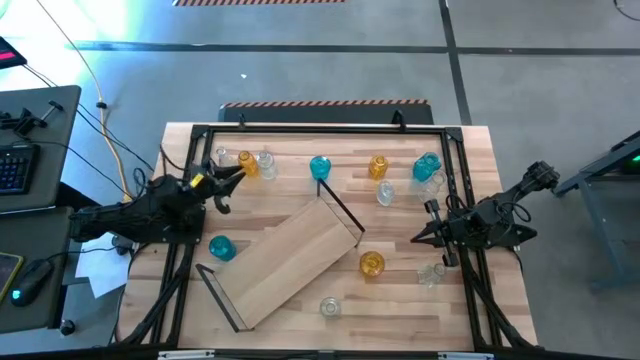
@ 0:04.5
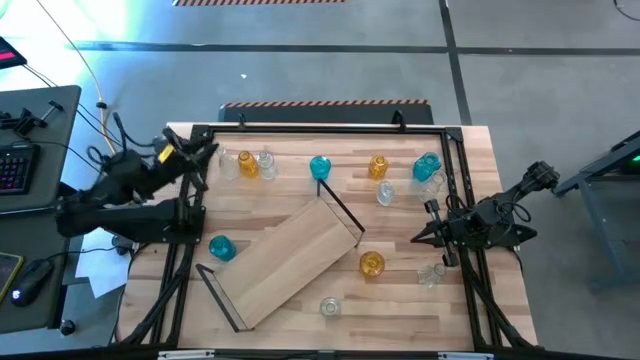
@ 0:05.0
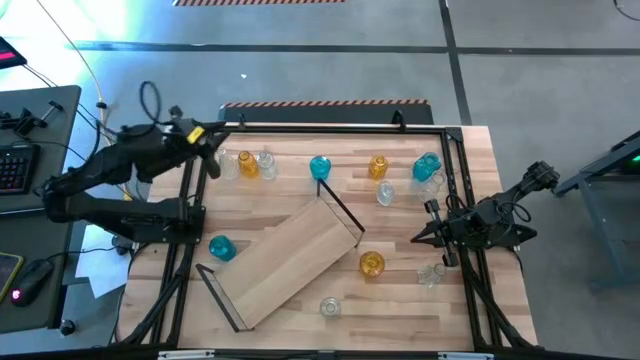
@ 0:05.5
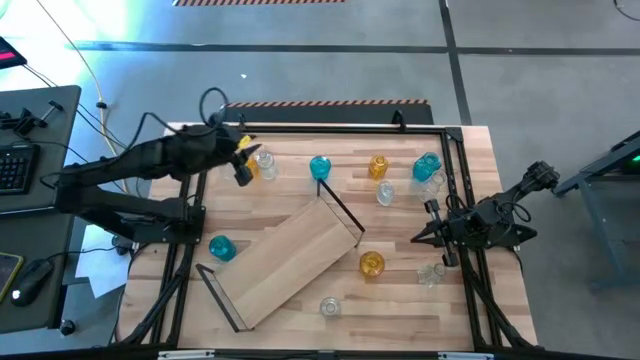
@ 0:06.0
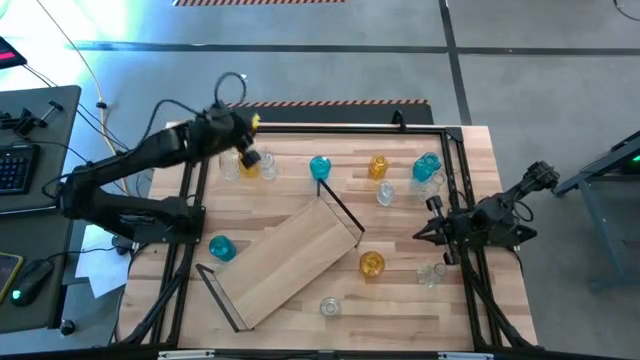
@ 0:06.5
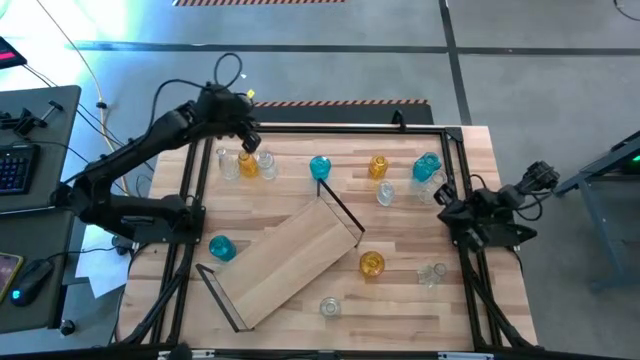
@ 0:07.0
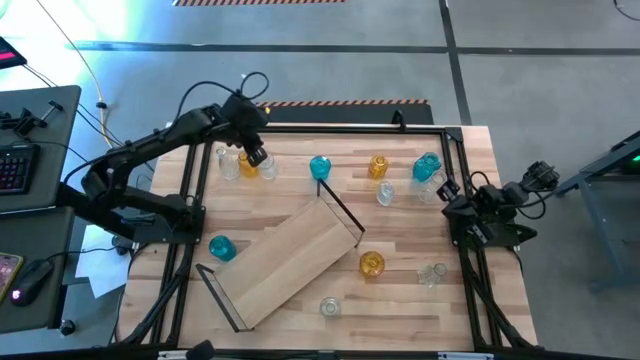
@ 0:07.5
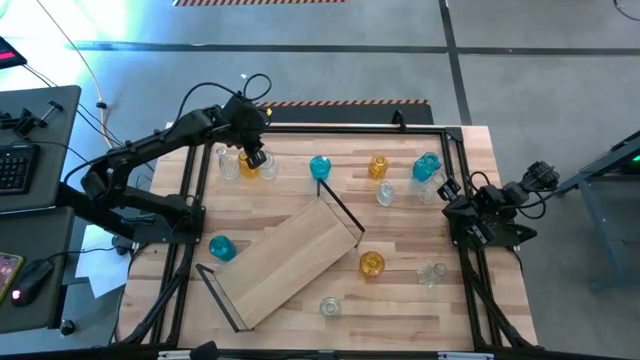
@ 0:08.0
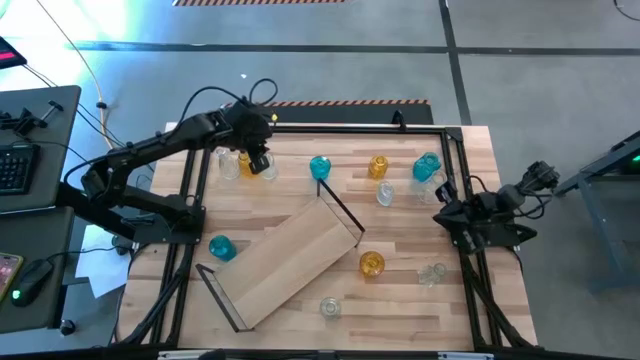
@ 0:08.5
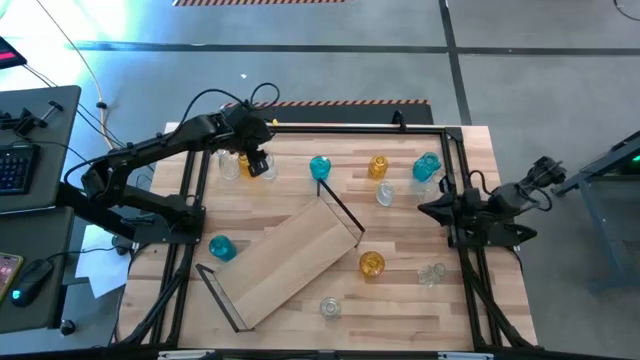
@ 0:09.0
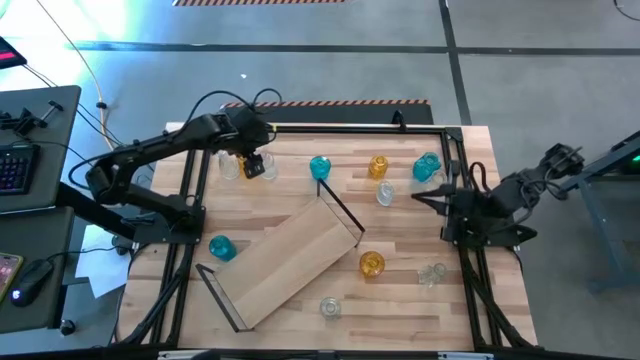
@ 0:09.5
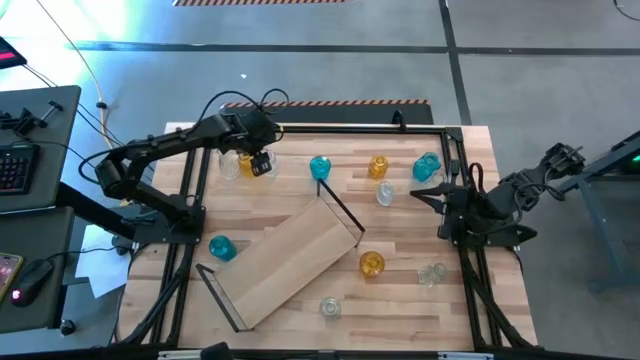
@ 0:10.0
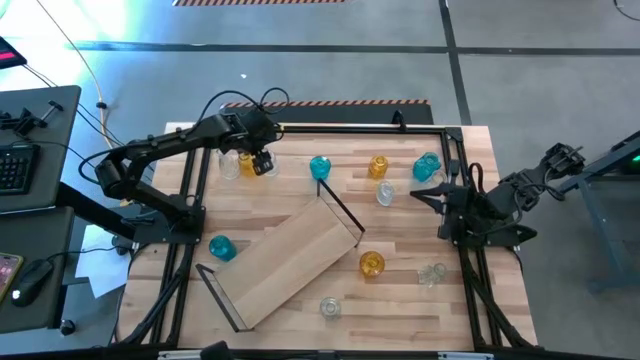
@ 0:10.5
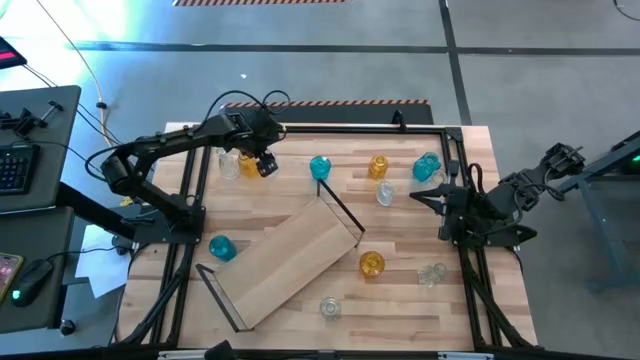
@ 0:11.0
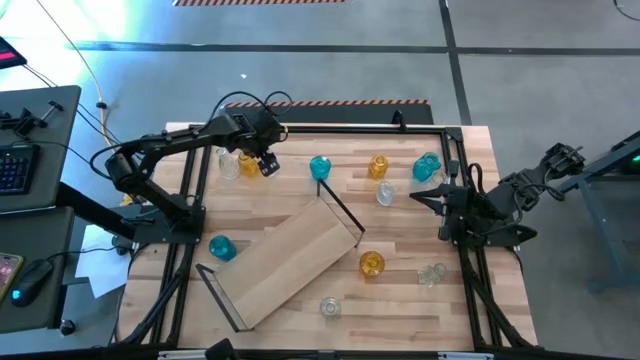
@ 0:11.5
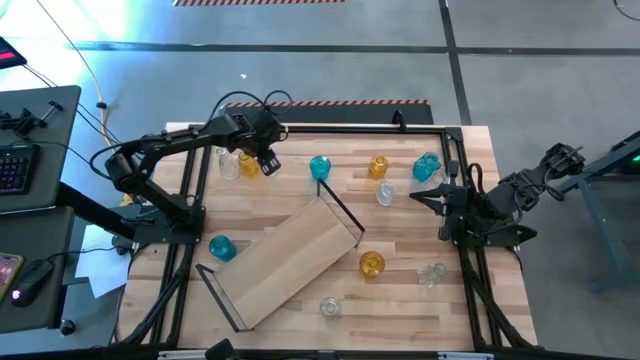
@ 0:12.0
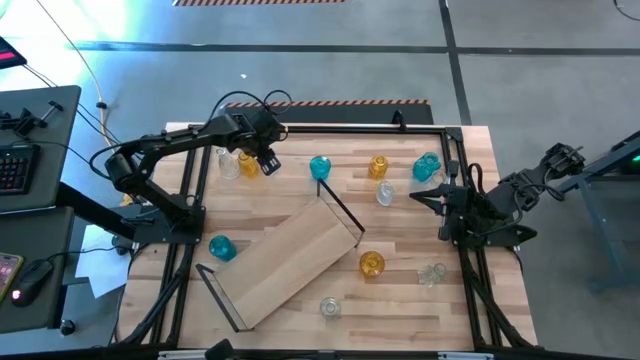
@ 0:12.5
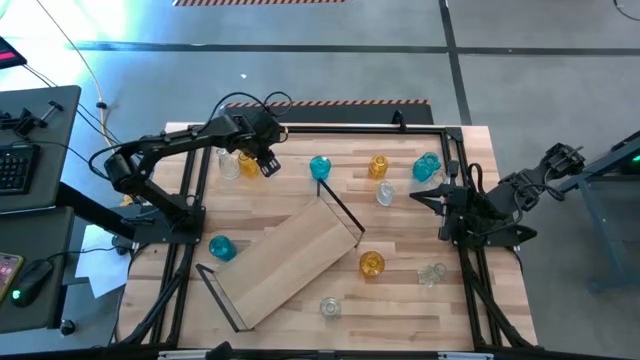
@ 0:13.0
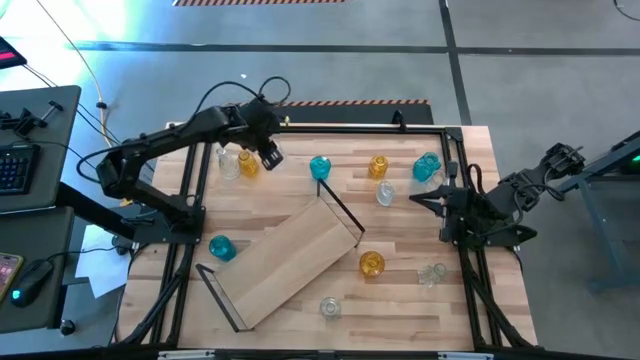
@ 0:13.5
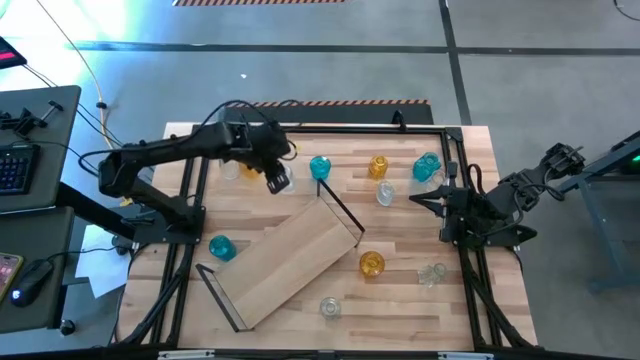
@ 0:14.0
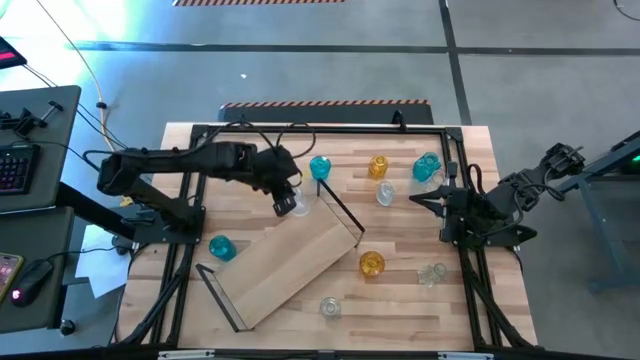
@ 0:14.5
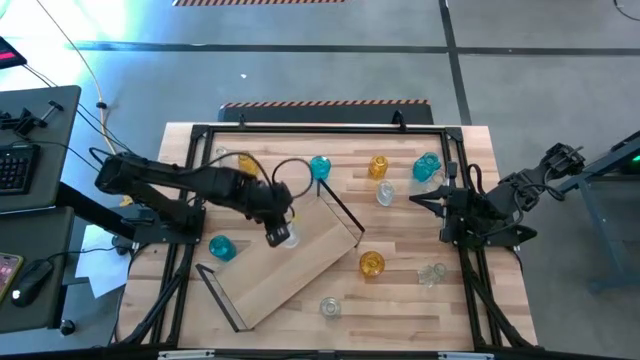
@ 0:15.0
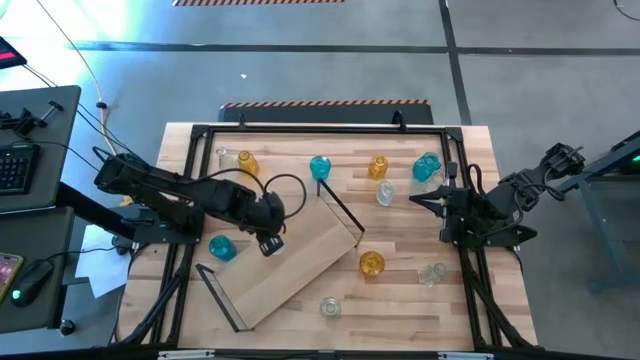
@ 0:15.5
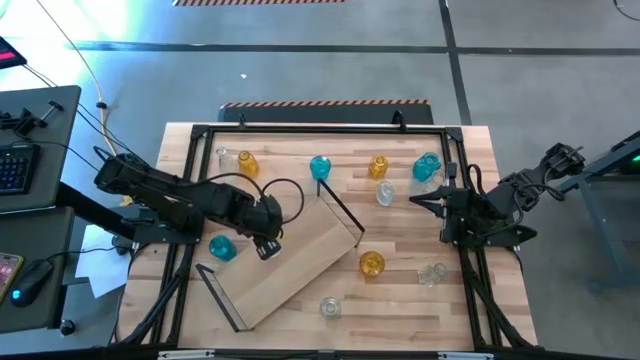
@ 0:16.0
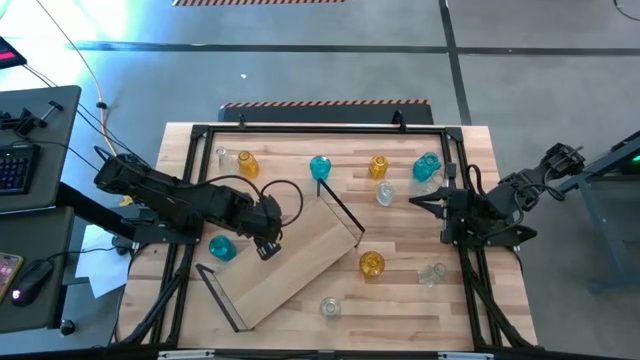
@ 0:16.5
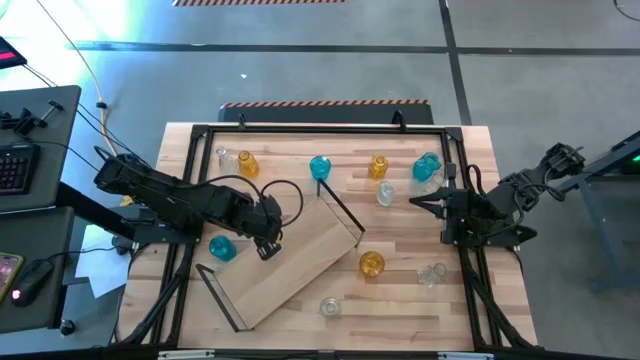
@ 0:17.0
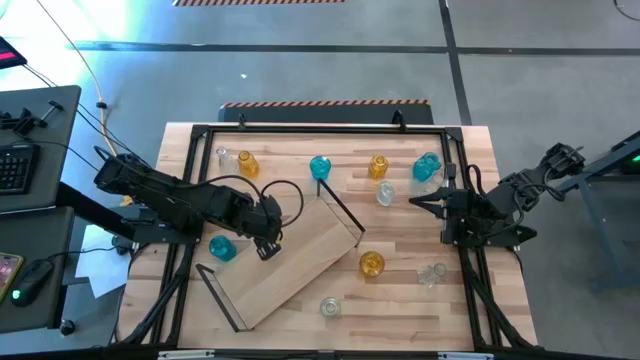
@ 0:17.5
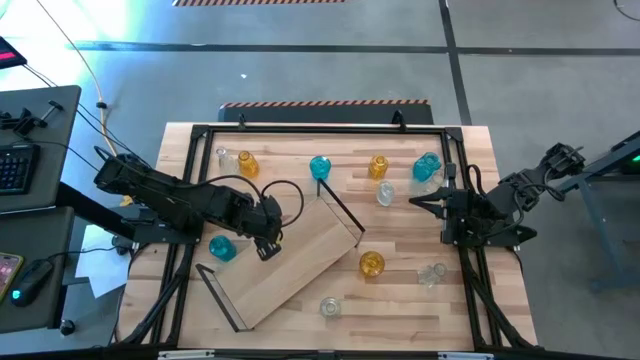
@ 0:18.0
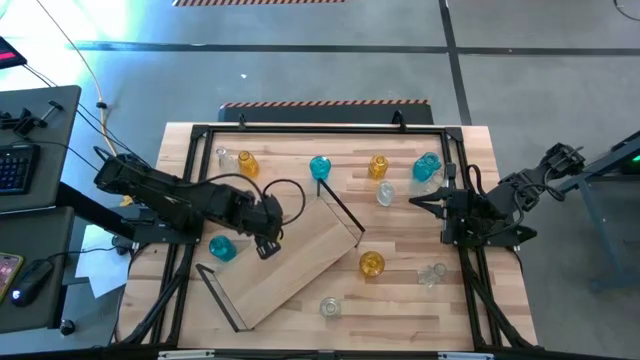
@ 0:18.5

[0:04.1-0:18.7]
Task: sort vases onto shelf
Put the transparent vase on the shelf

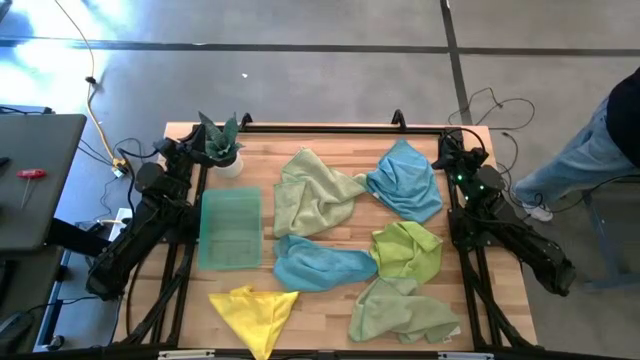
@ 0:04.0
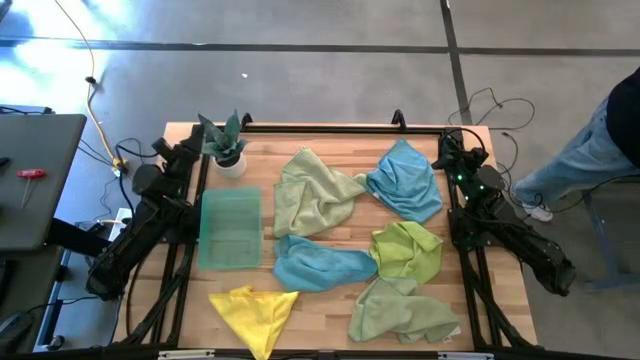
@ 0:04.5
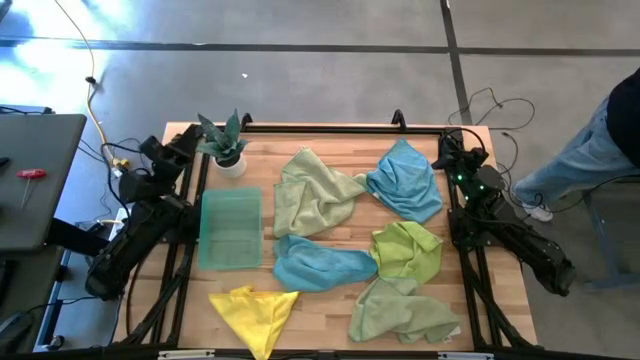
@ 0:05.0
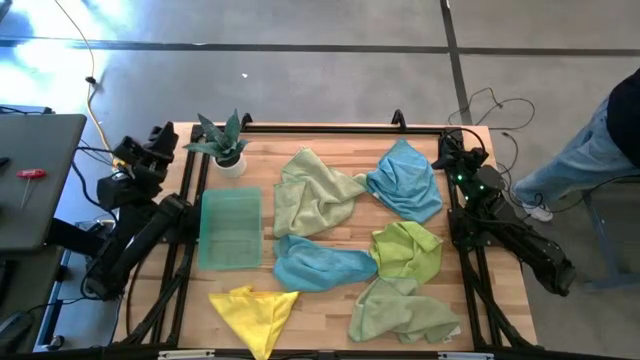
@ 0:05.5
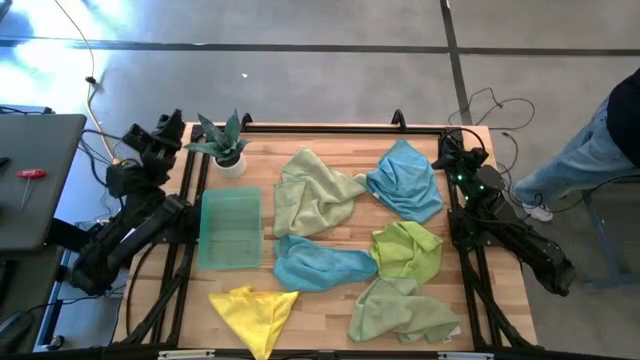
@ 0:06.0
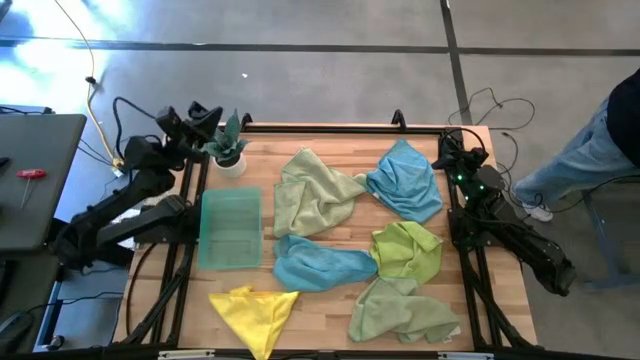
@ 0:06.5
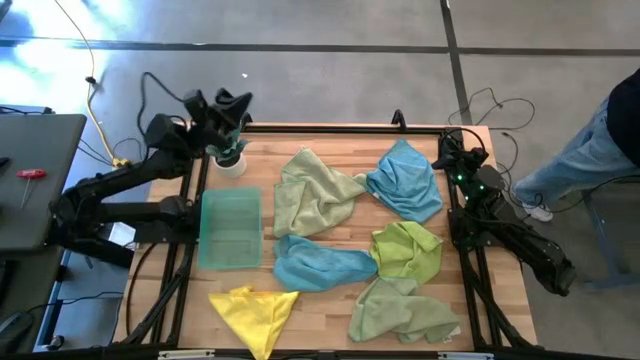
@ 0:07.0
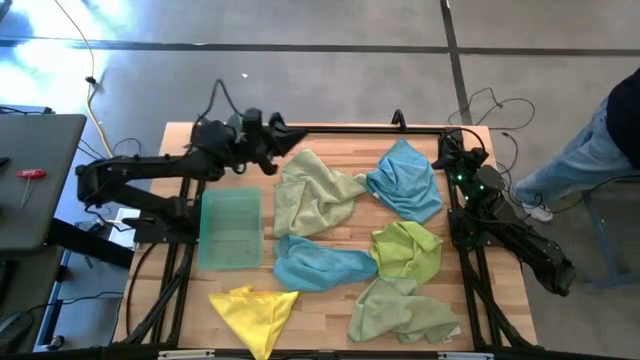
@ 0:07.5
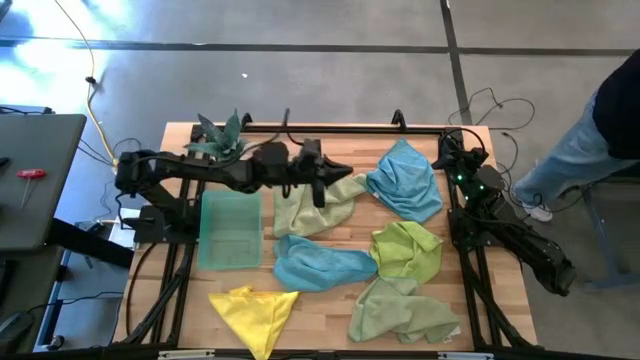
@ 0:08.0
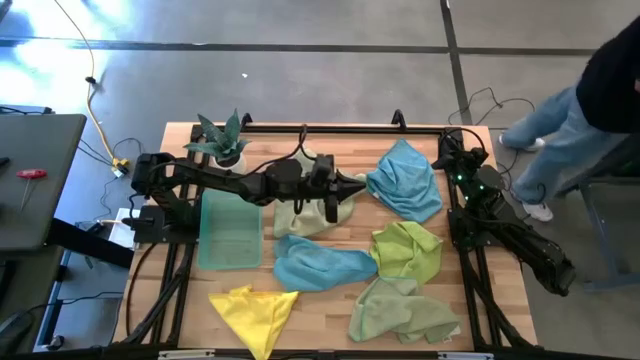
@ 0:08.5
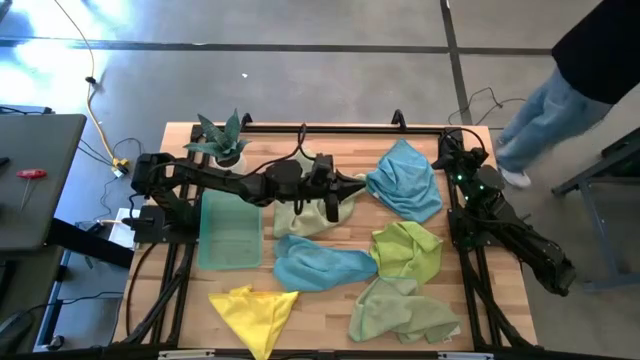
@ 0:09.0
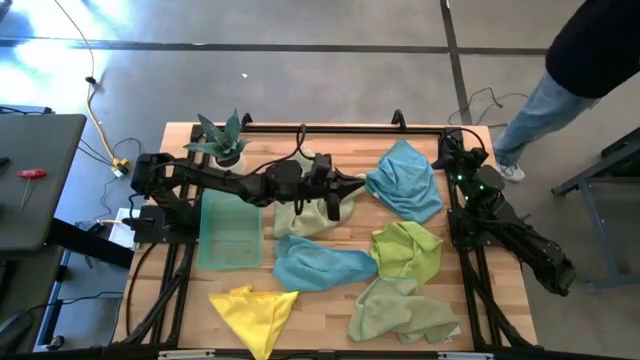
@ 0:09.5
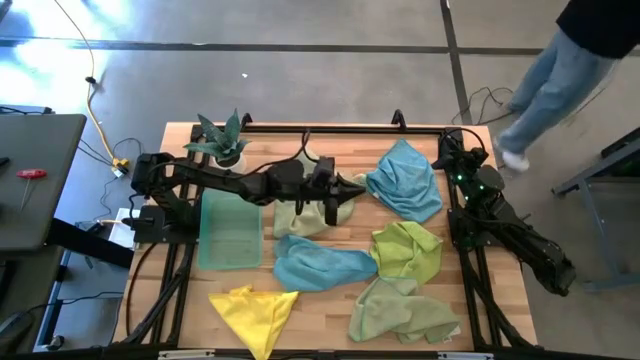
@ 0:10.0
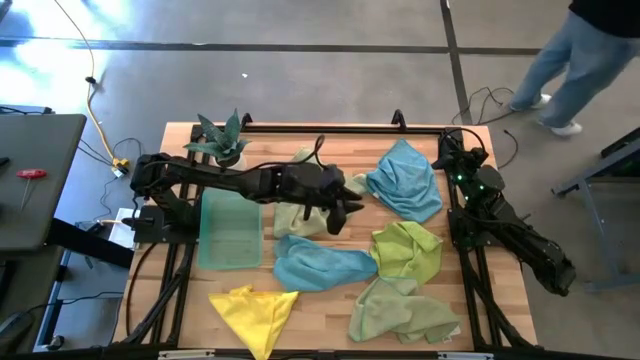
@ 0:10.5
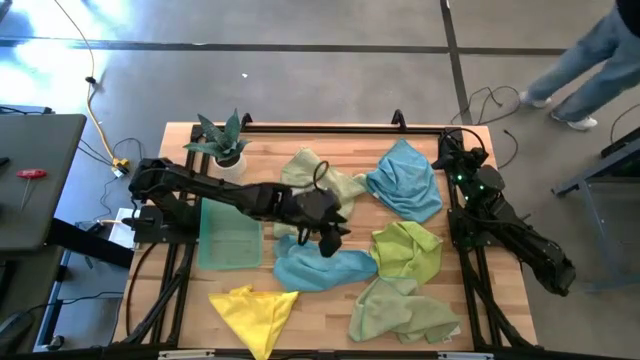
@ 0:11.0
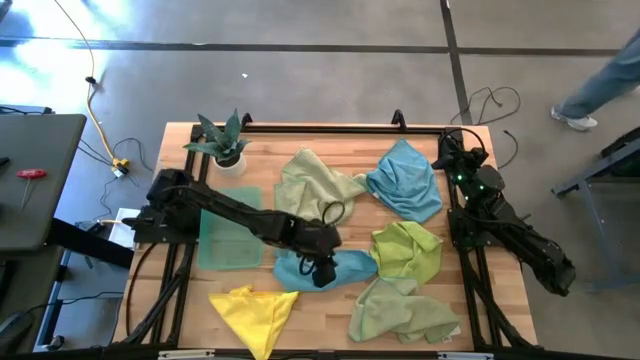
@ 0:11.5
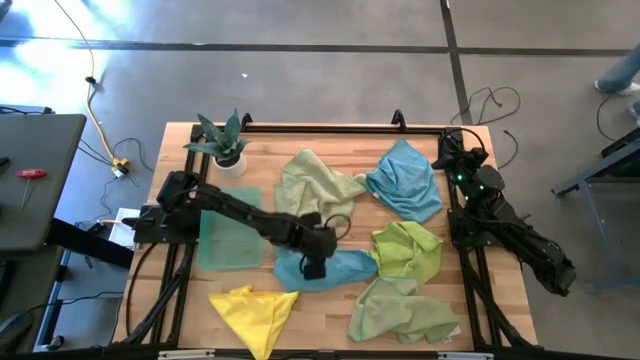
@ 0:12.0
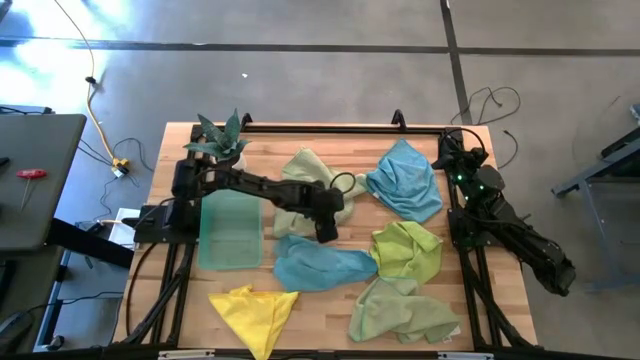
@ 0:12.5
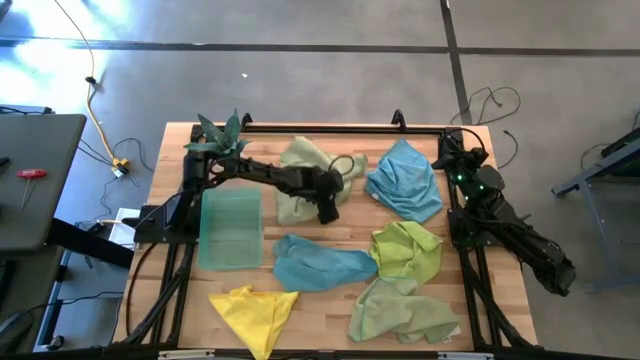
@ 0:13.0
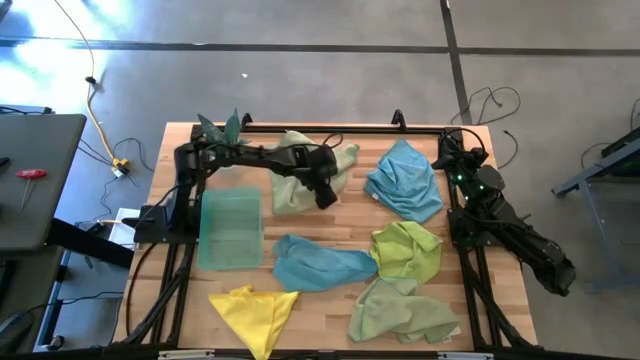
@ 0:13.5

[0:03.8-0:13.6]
Task: Fold microfiber towels
Adjust the top green microfiber towel
